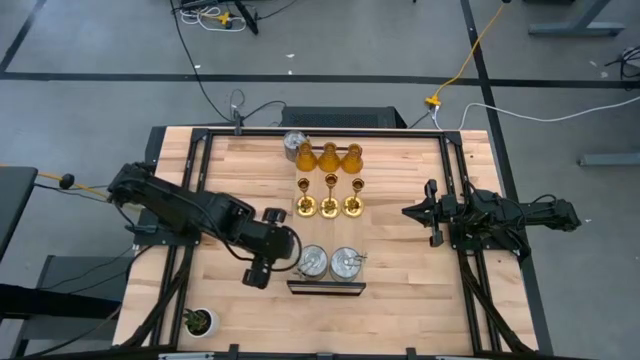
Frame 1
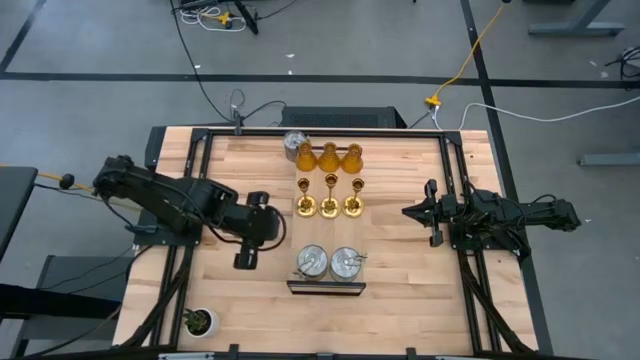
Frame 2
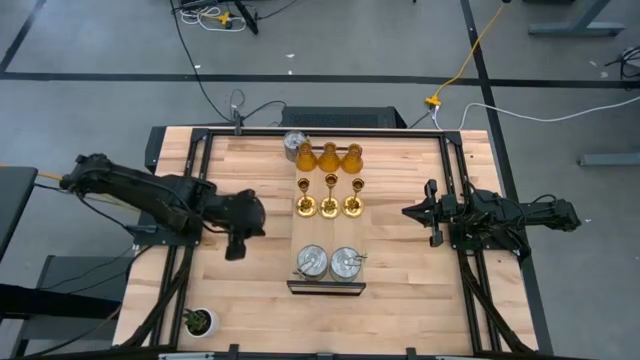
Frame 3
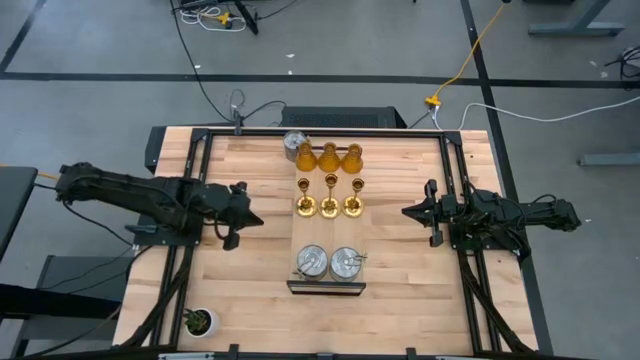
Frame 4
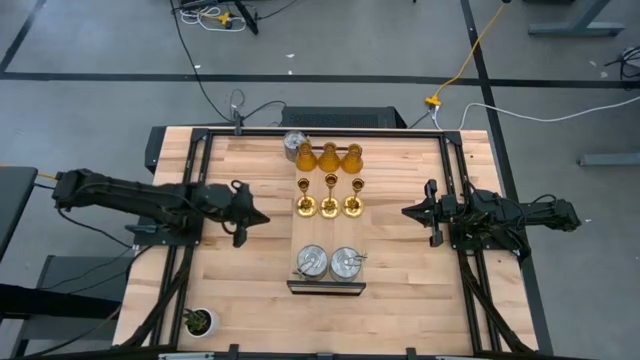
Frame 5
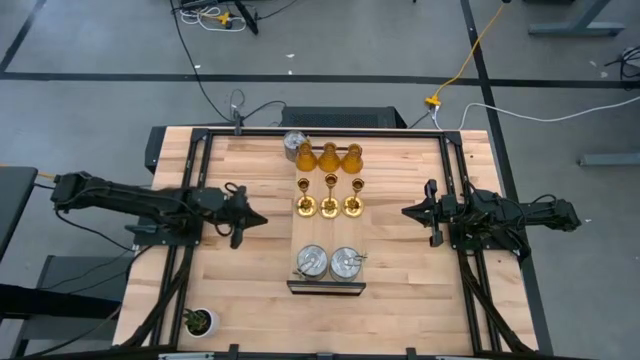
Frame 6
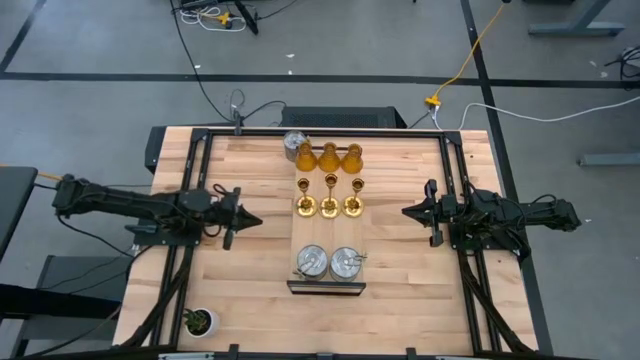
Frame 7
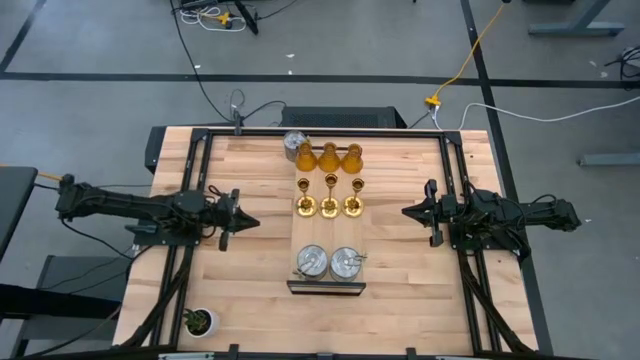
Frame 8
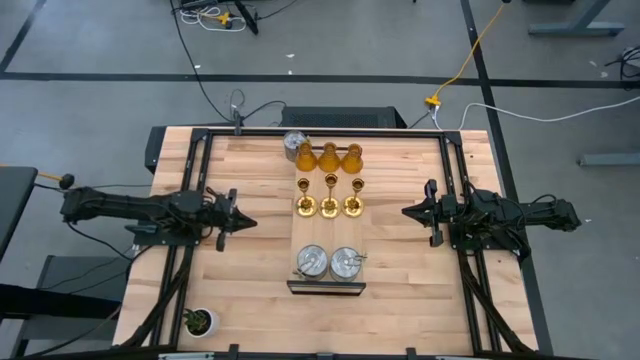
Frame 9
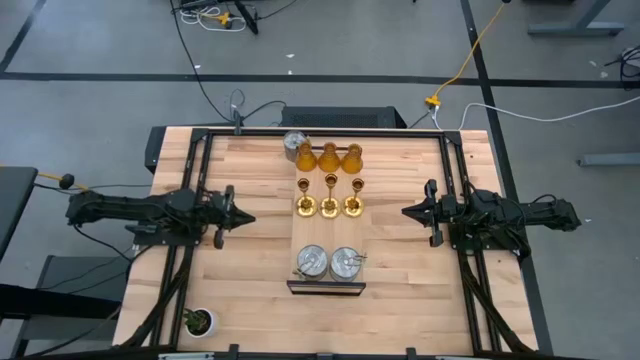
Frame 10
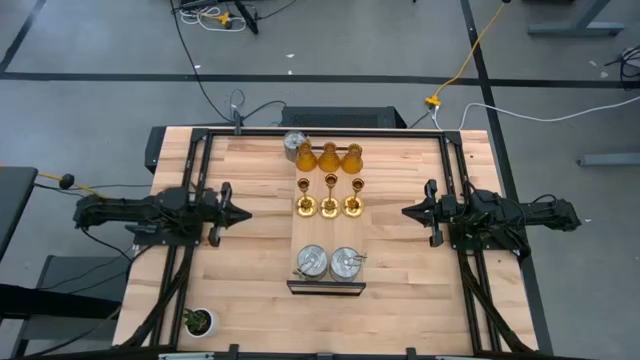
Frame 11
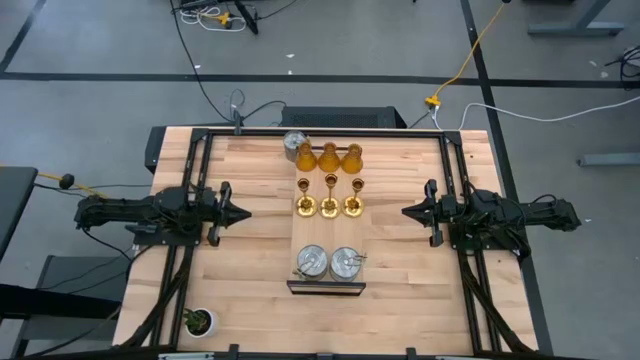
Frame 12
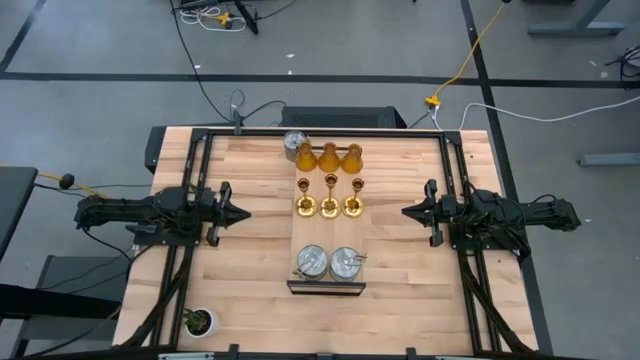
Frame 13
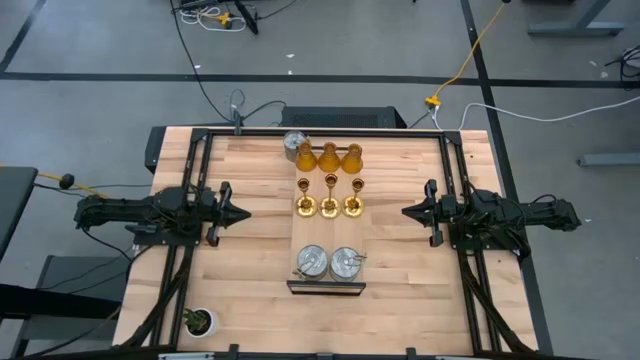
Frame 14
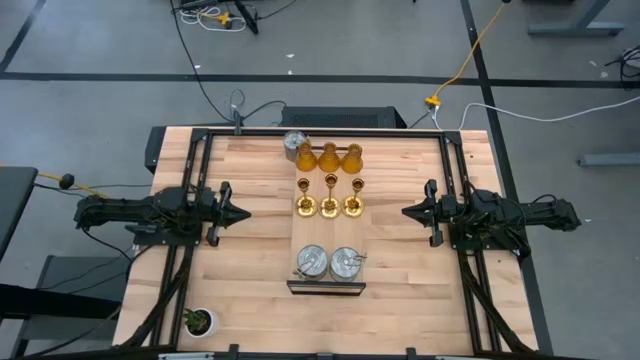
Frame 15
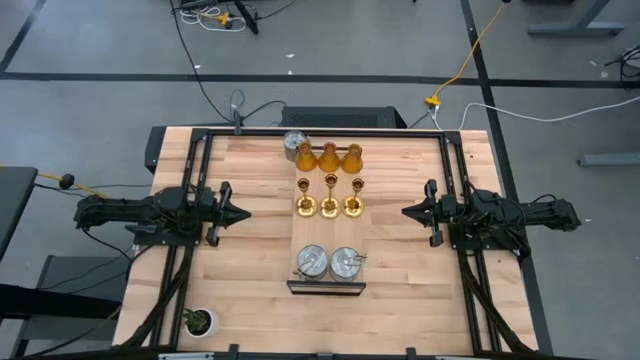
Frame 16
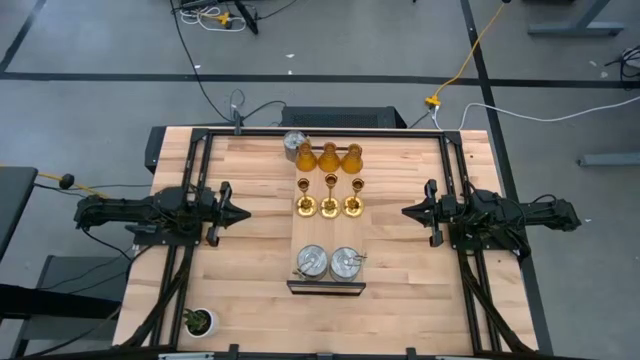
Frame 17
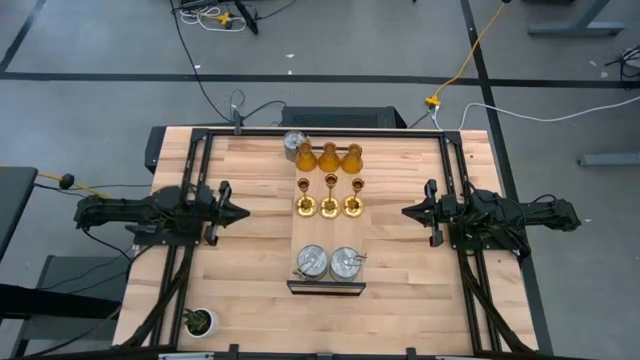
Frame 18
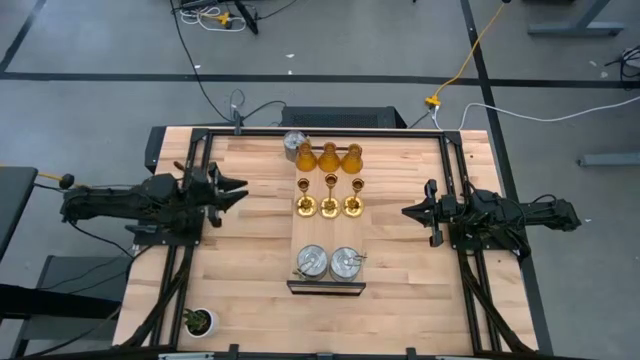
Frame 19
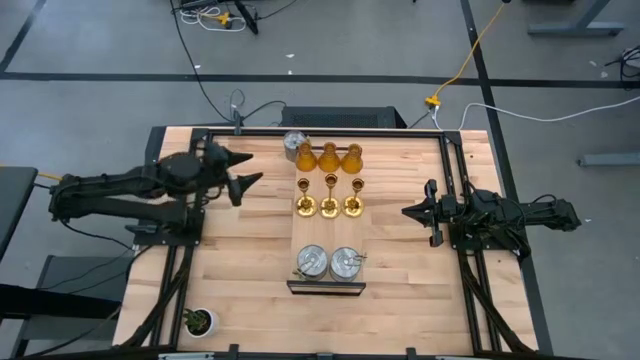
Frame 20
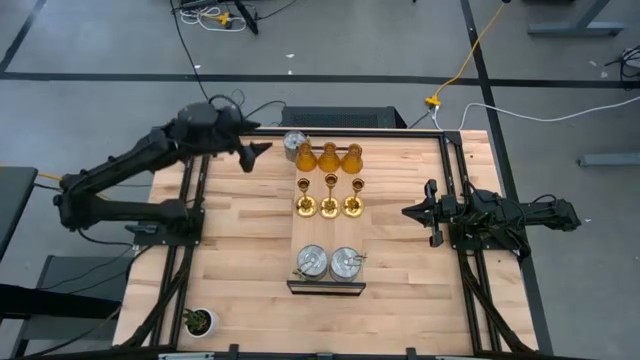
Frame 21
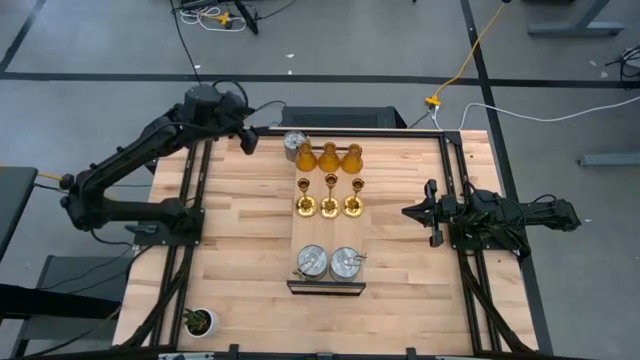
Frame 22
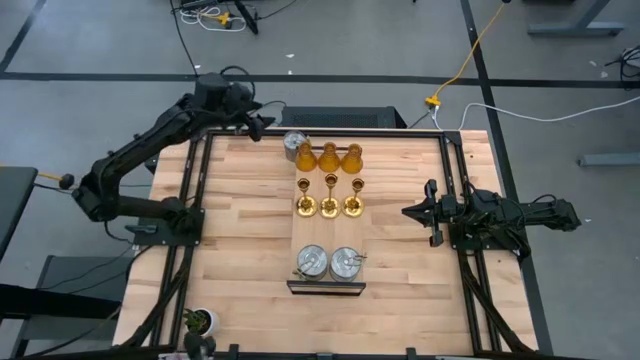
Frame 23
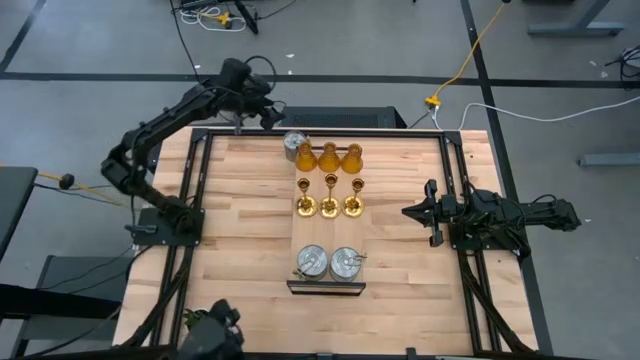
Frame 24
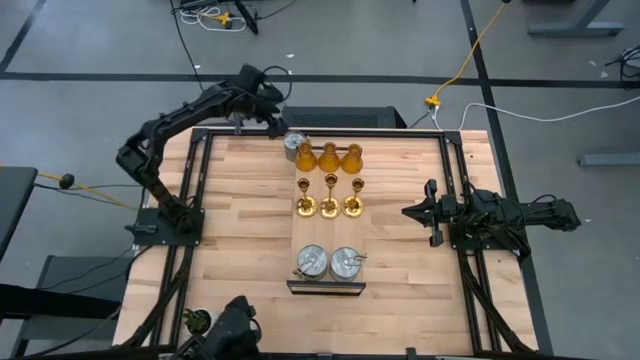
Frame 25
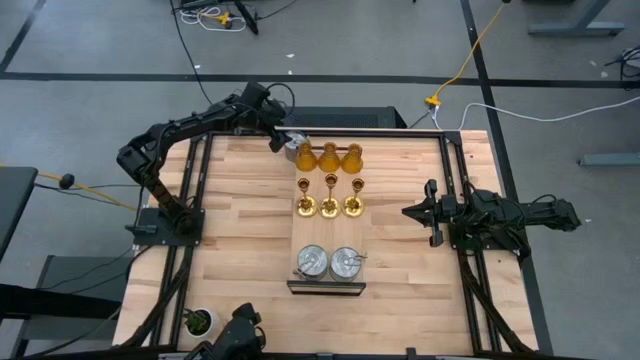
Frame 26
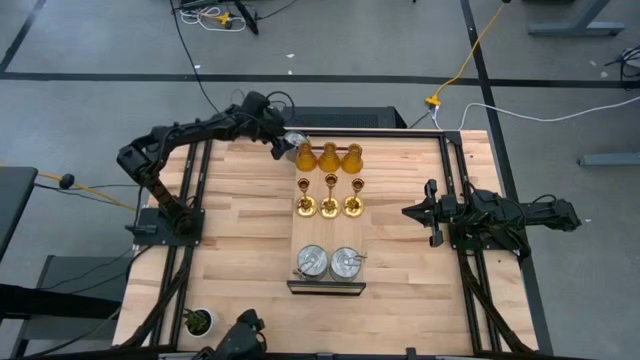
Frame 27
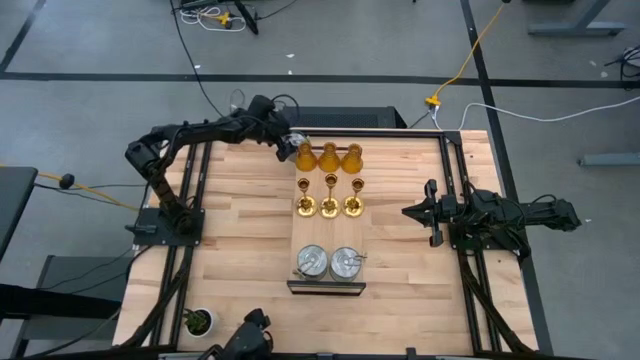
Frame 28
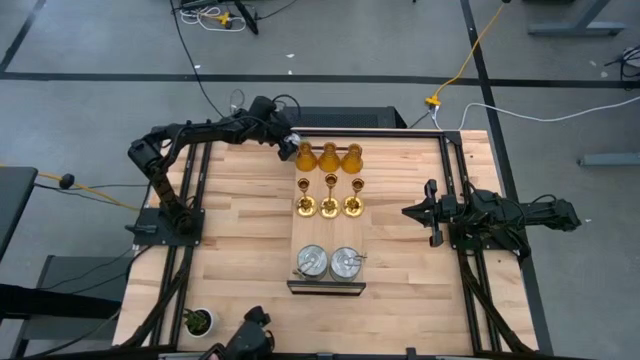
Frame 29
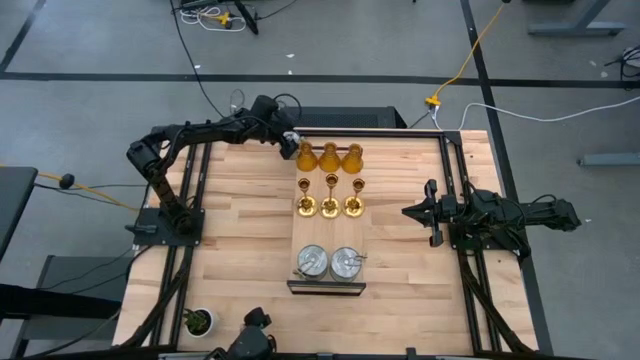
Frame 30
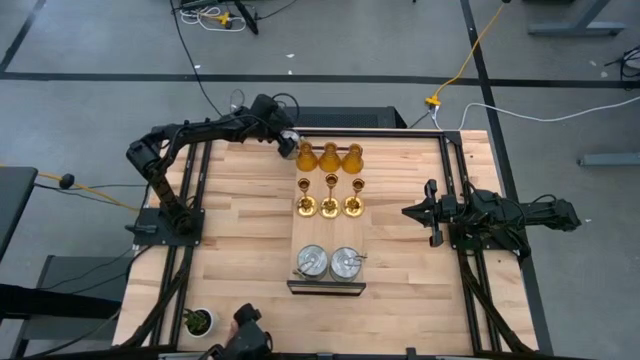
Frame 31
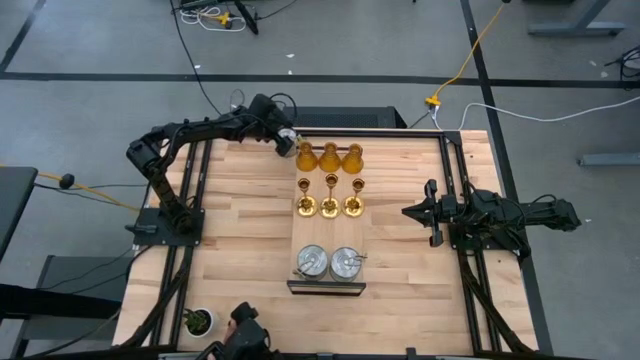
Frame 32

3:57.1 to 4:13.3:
Task: Pick & Place candle stick holders
Put the scented candle on the shelf

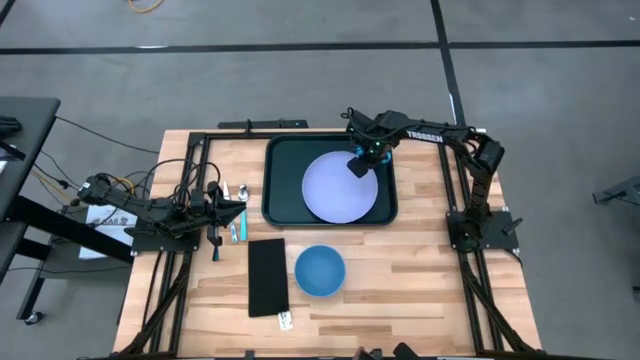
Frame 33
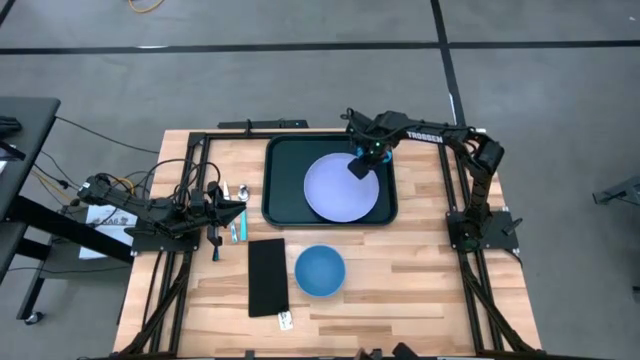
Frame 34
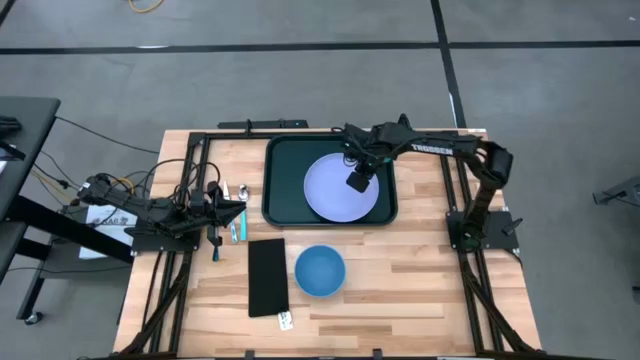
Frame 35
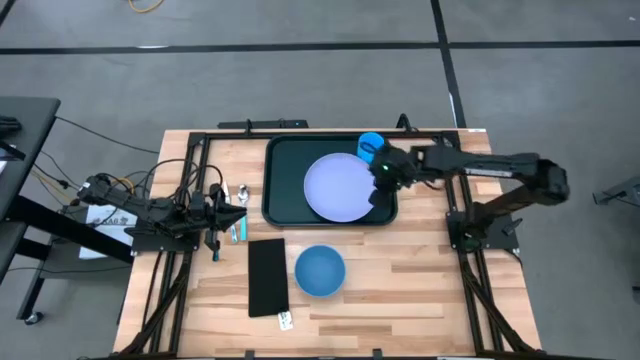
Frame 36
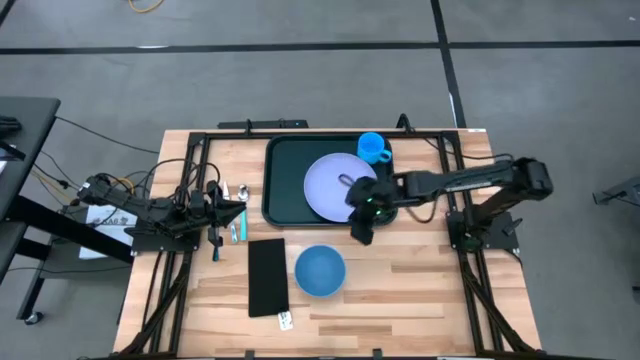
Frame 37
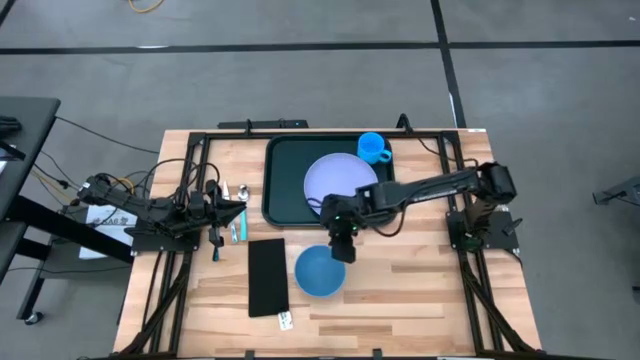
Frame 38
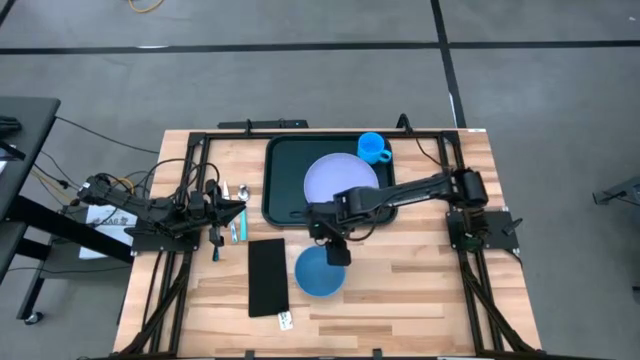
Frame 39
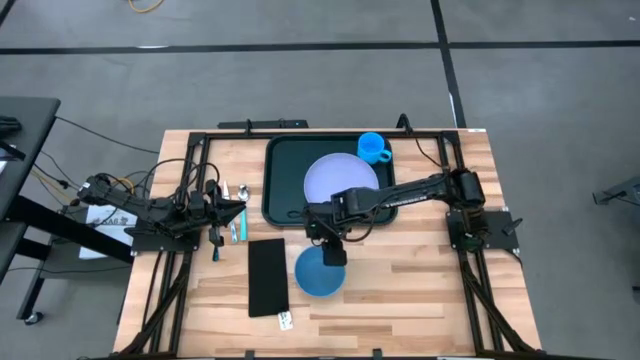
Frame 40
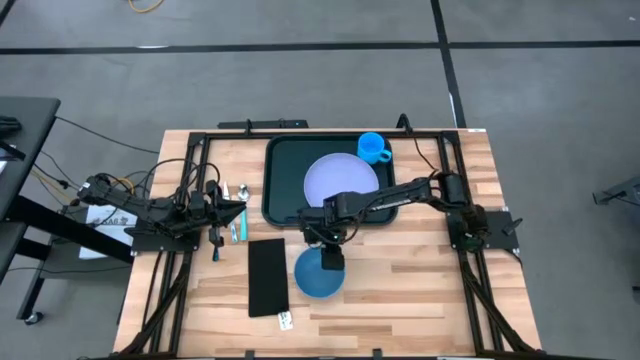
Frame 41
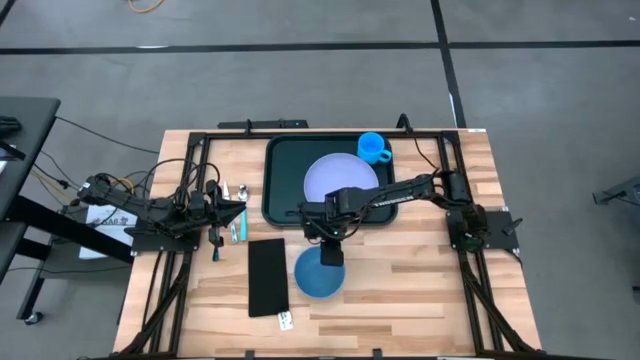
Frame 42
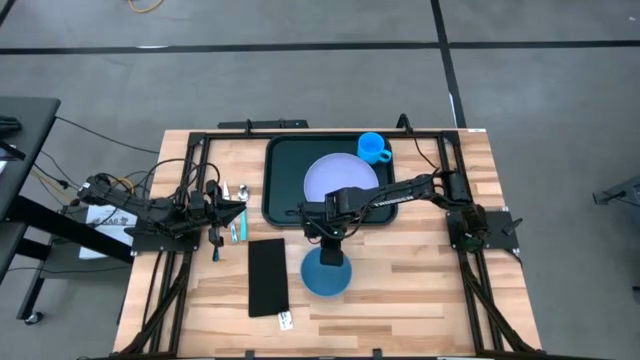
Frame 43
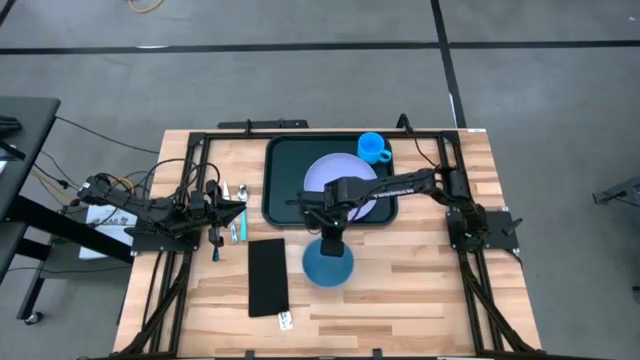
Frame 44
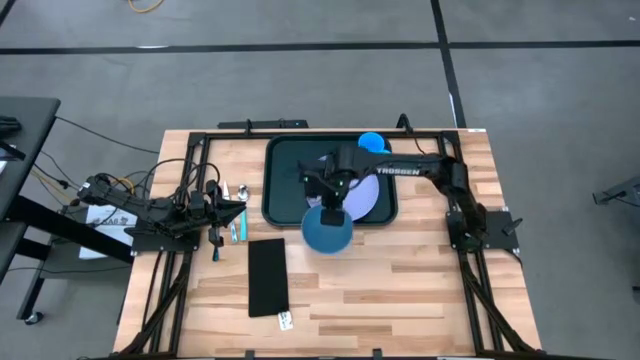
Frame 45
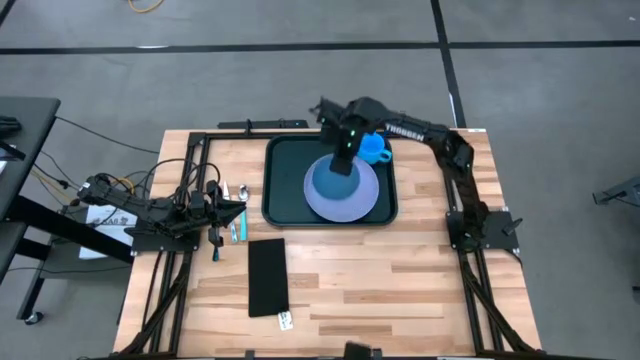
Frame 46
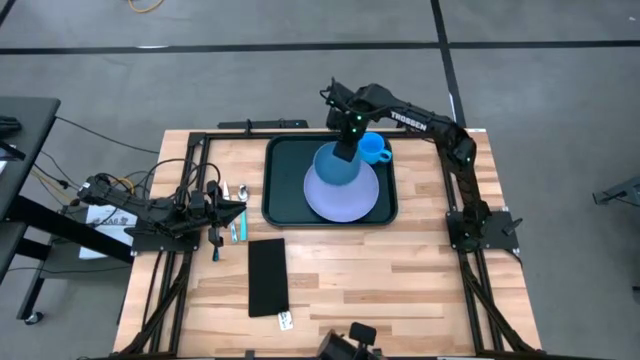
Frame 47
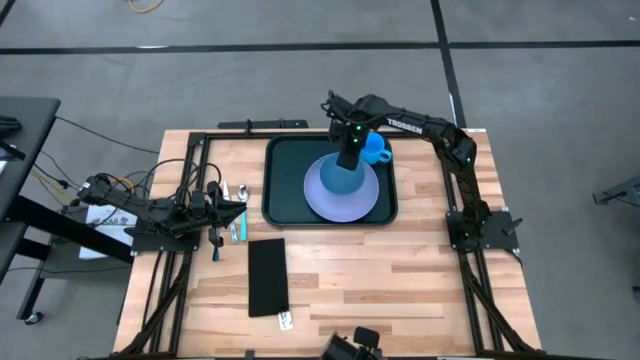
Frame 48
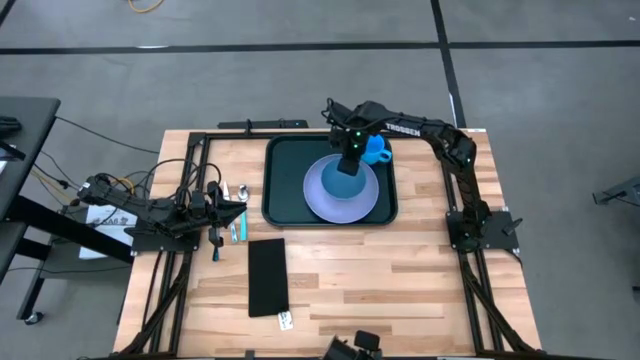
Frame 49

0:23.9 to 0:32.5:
Task: Set up tray
Put the blue bowl on top of the purple plate
